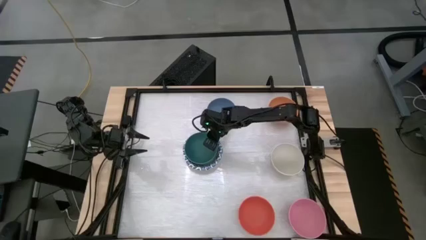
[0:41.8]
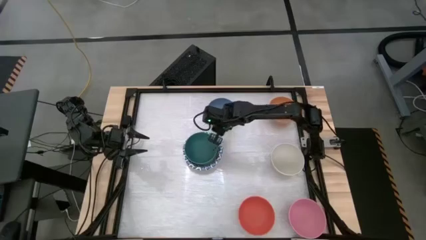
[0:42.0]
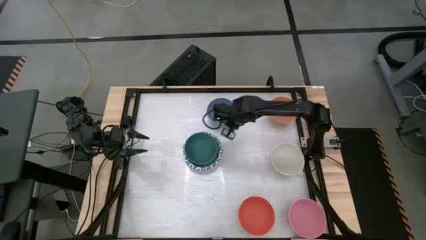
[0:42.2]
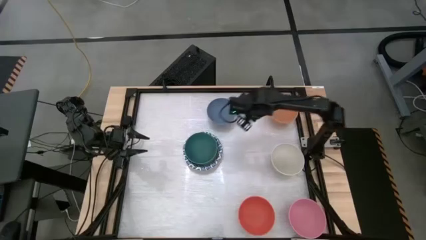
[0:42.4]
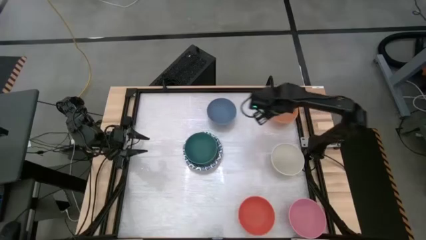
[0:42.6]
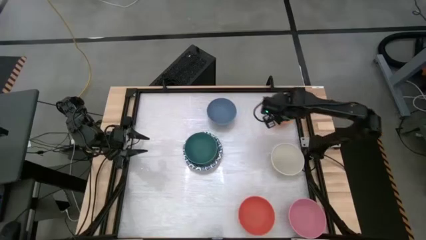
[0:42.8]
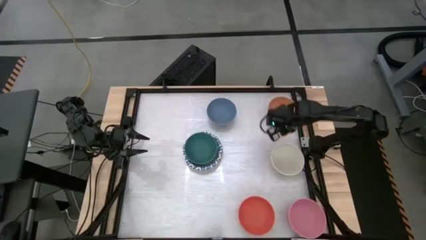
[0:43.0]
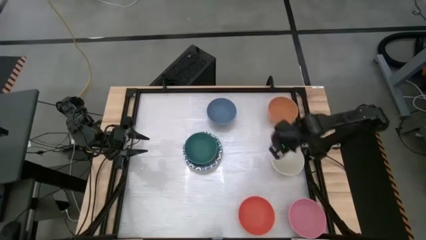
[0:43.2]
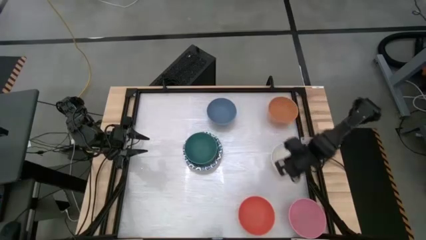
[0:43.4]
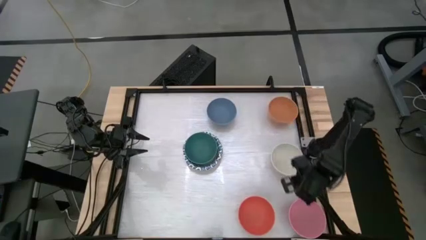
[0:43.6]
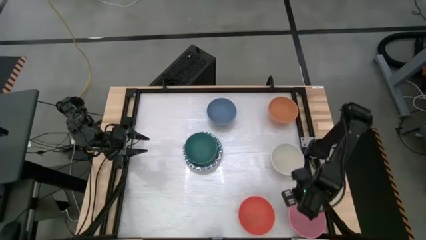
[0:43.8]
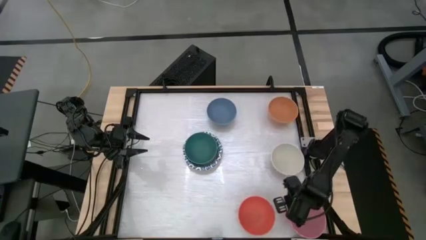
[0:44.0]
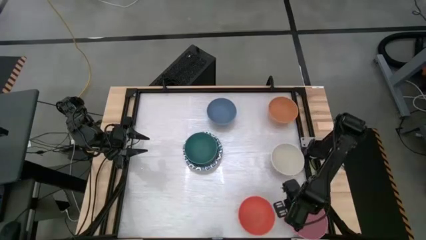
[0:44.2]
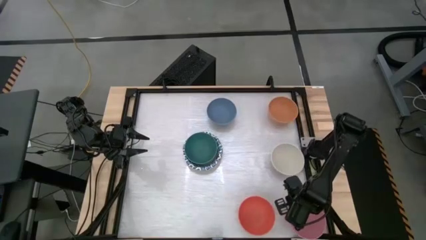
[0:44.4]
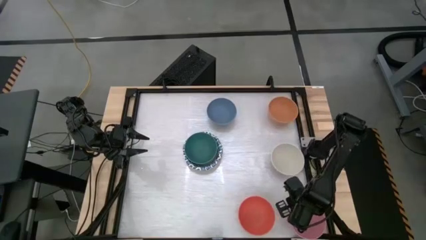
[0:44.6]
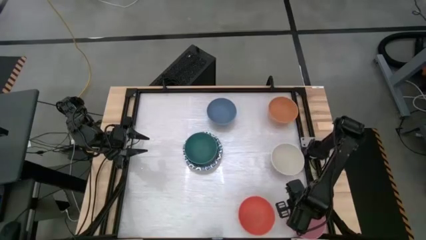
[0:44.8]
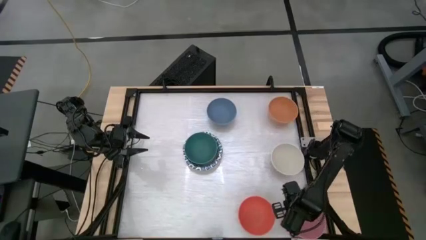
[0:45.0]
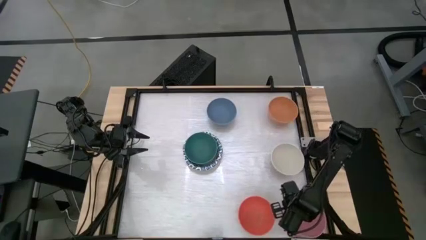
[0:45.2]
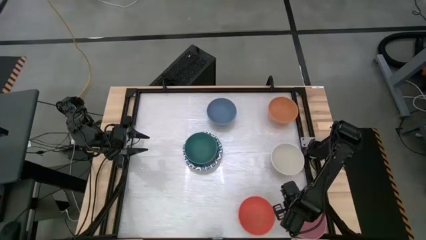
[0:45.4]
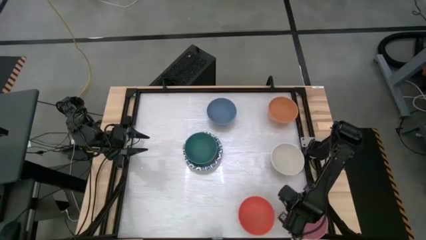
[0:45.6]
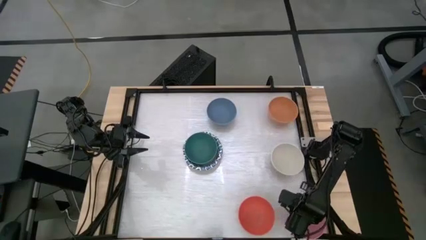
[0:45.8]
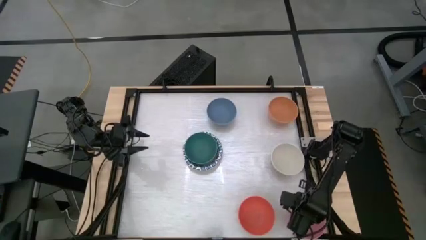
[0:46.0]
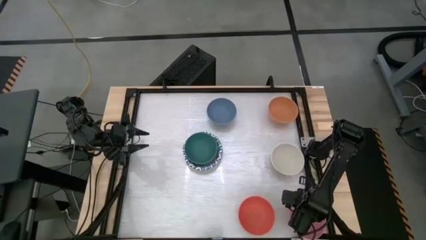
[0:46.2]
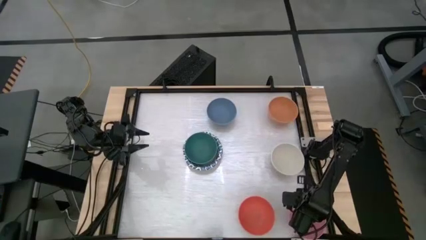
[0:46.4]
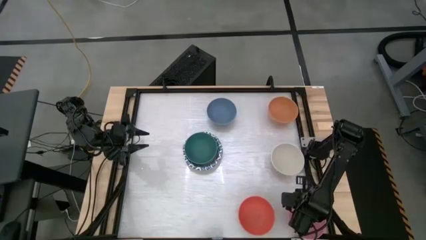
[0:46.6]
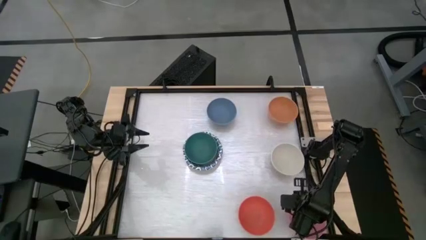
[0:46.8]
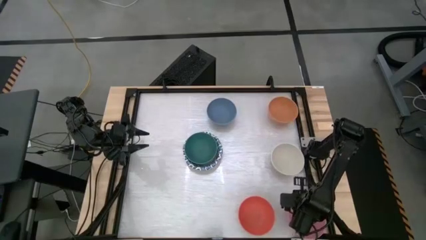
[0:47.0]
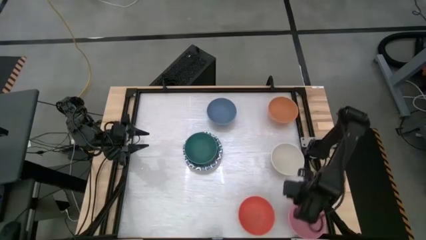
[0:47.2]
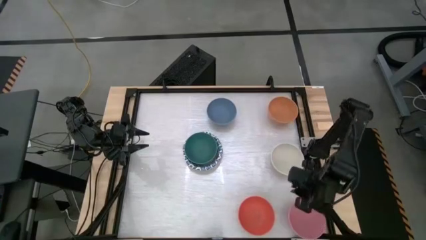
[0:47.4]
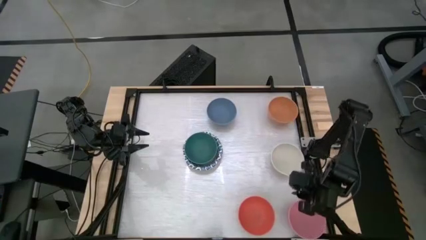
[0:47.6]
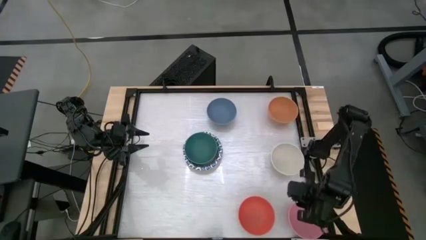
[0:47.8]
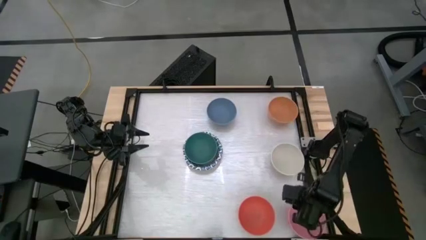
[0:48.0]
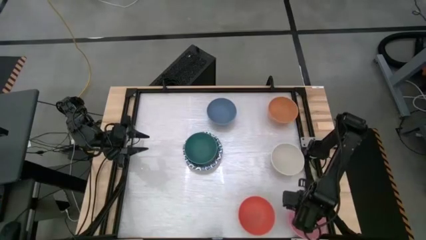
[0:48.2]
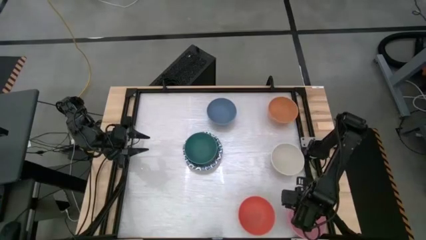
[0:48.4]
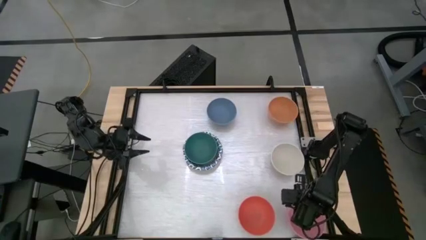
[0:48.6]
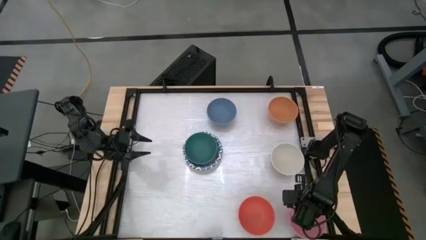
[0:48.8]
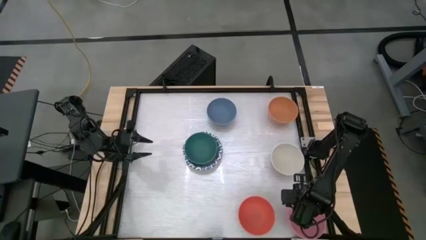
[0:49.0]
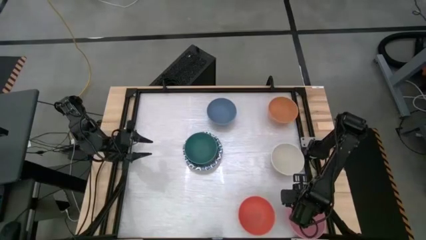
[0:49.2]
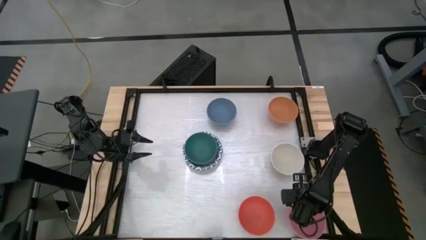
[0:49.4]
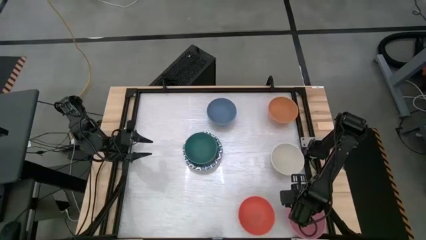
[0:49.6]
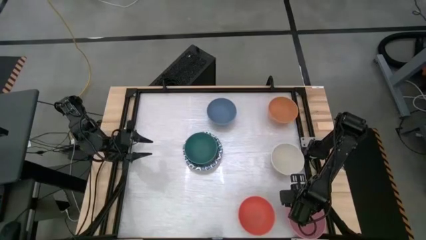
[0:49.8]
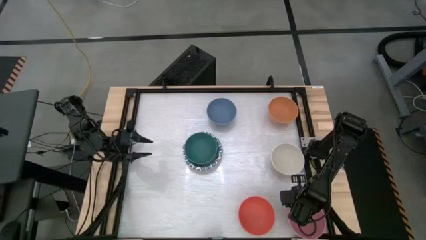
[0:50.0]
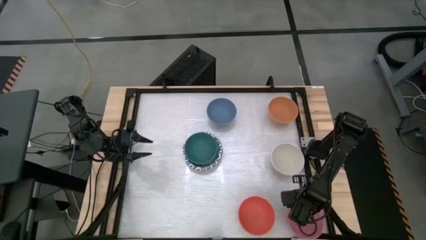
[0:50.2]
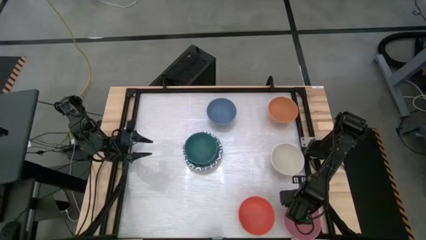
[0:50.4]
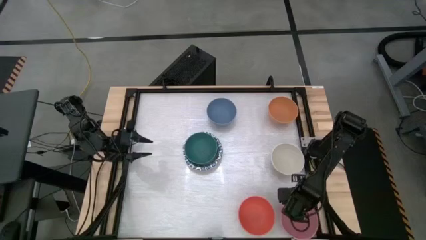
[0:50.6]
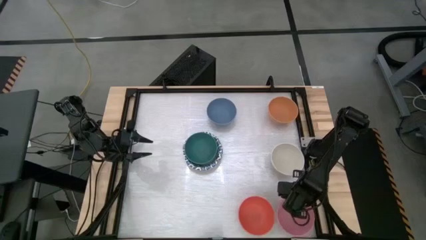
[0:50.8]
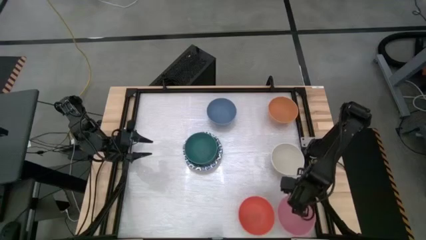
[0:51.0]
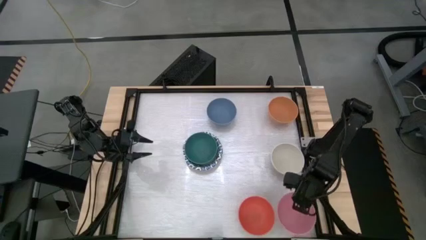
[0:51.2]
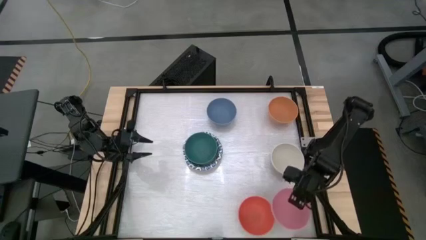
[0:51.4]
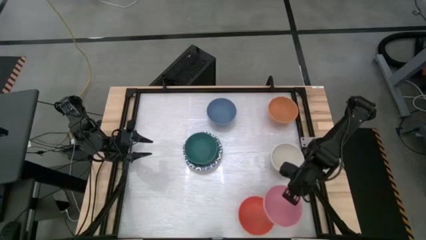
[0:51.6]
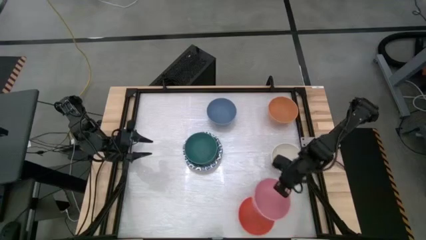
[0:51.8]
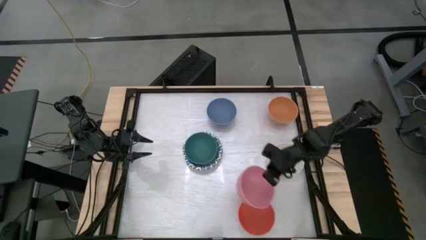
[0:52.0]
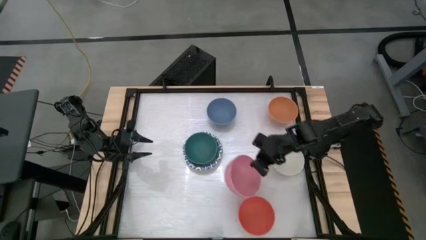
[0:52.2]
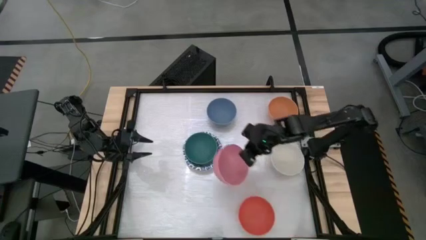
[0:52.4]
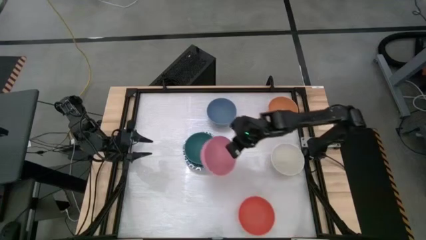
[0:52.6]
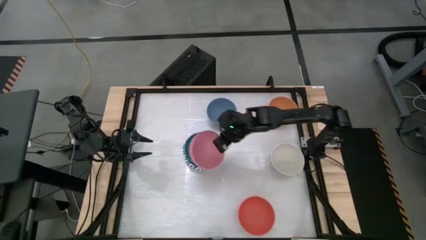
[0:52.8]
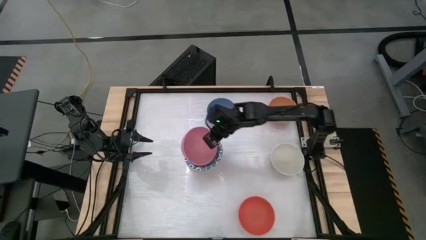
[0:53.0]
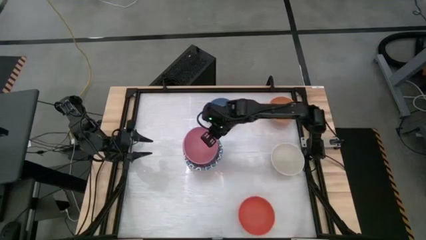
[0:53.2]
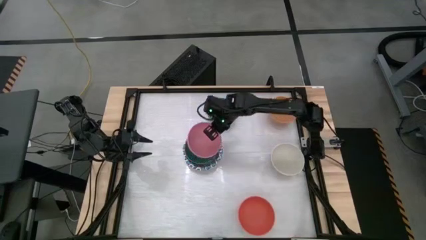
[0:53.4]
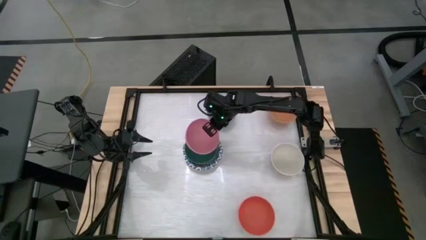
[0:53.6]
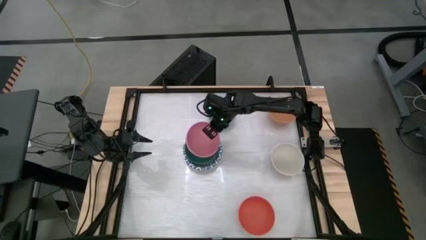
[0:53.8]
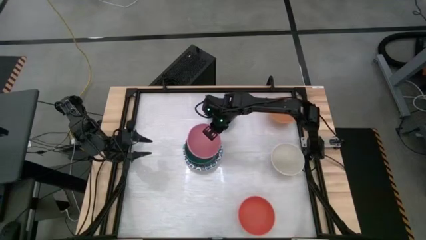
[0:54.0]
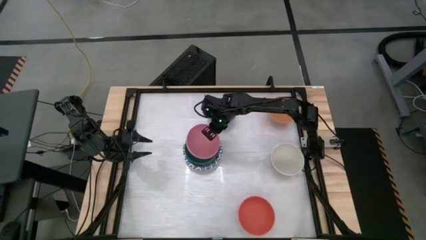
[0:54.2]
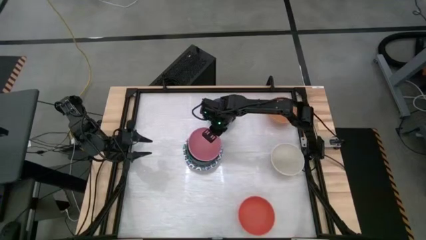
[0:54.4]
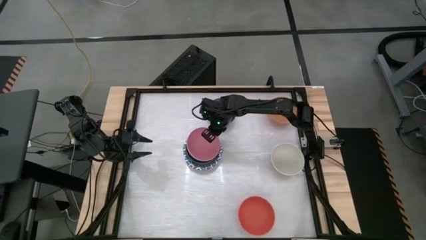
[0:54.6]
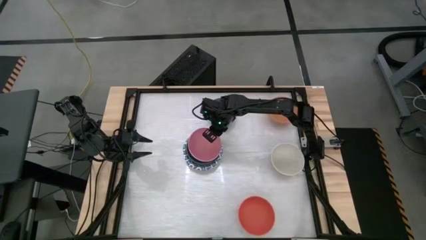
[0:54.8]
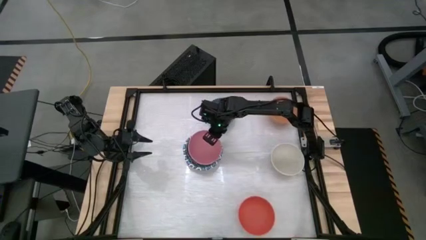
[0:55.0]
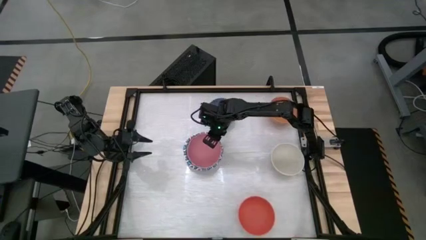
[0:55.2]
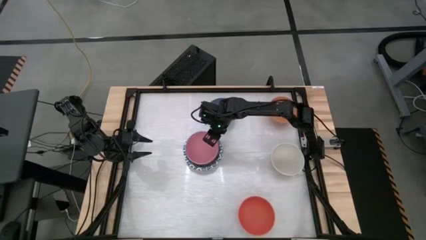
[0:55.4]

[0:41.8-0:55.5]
Stack the pink bowl on top of the green bowl
